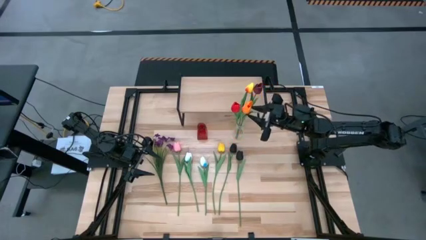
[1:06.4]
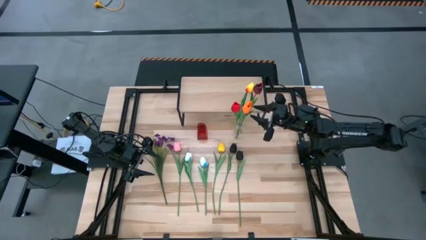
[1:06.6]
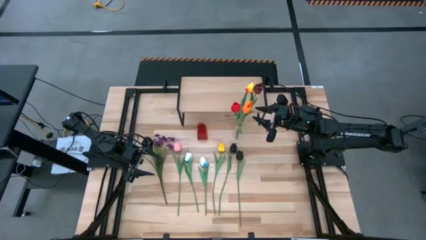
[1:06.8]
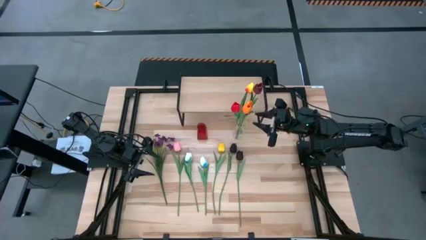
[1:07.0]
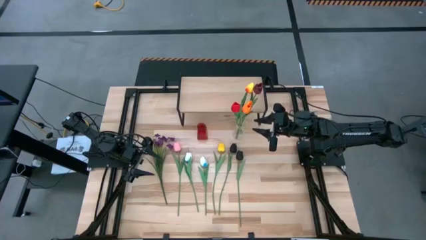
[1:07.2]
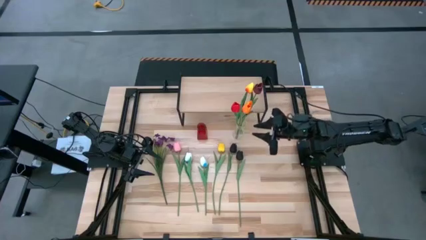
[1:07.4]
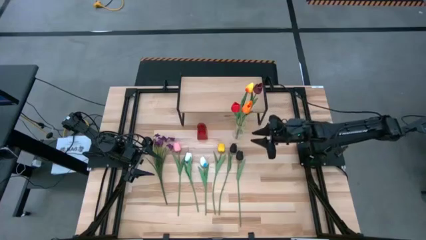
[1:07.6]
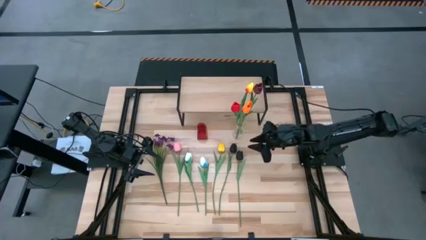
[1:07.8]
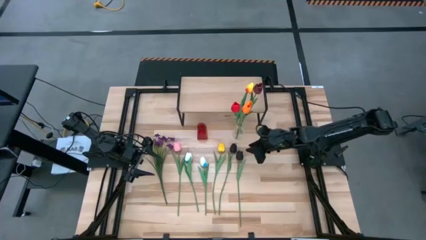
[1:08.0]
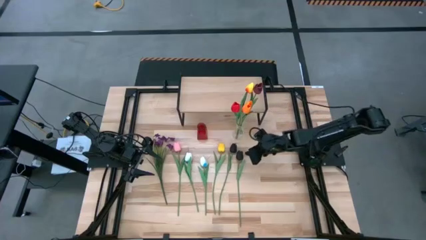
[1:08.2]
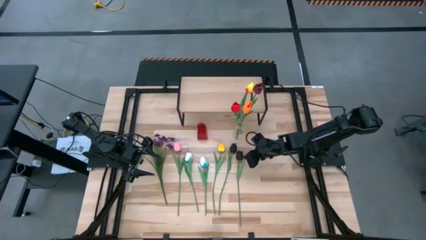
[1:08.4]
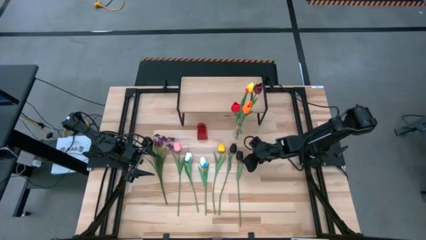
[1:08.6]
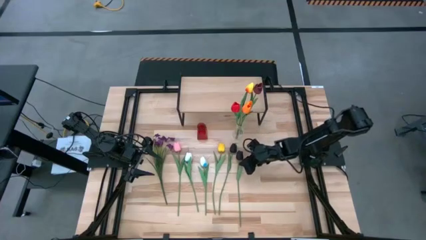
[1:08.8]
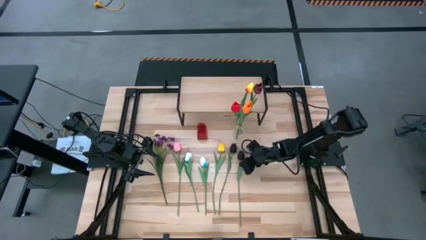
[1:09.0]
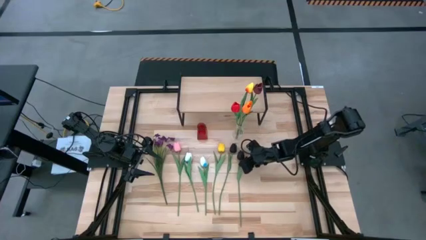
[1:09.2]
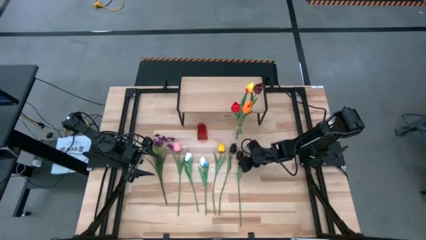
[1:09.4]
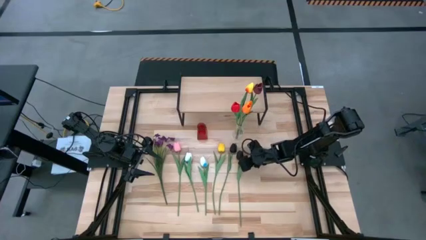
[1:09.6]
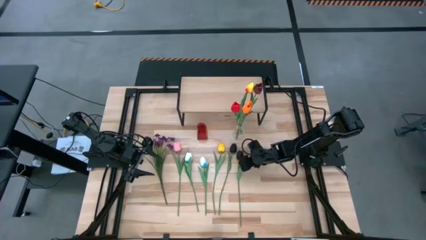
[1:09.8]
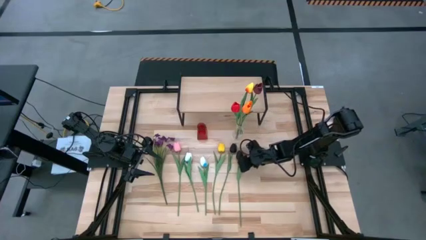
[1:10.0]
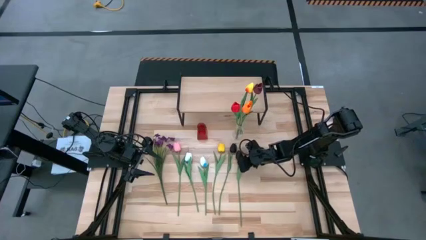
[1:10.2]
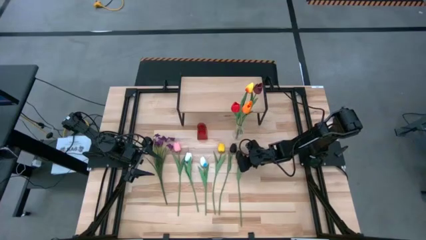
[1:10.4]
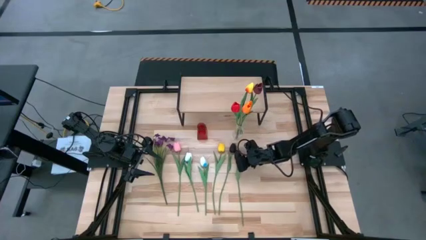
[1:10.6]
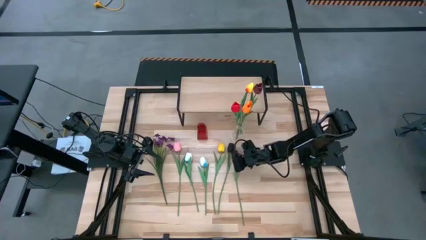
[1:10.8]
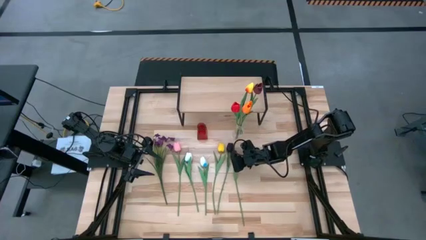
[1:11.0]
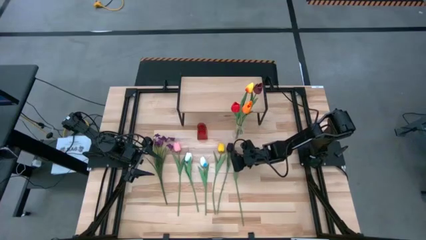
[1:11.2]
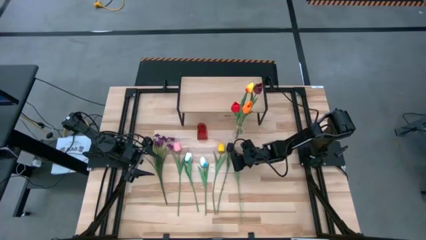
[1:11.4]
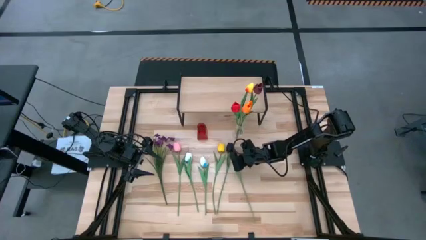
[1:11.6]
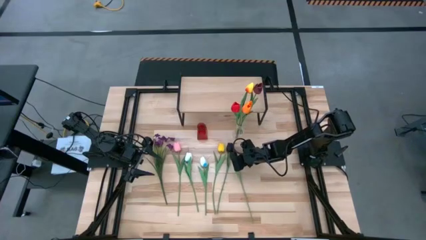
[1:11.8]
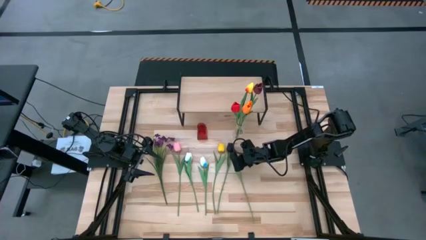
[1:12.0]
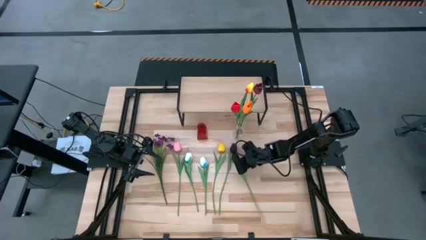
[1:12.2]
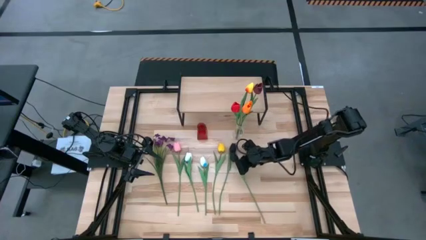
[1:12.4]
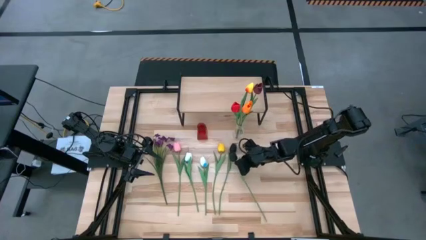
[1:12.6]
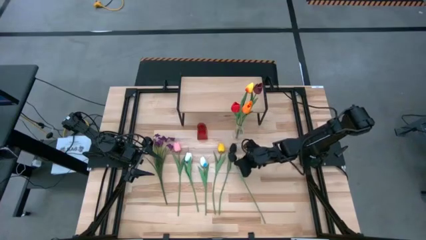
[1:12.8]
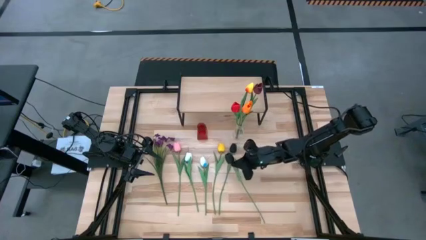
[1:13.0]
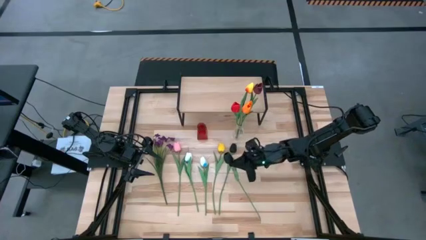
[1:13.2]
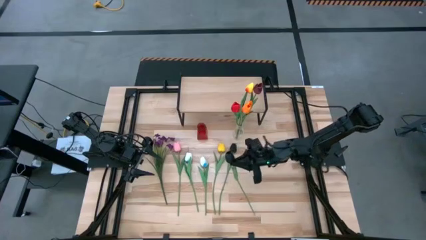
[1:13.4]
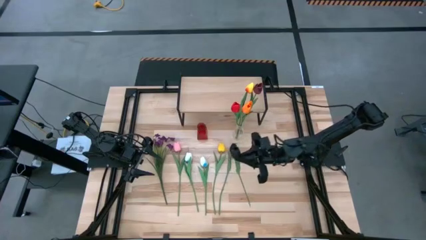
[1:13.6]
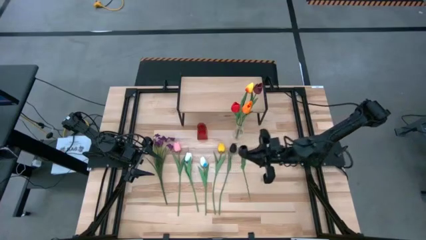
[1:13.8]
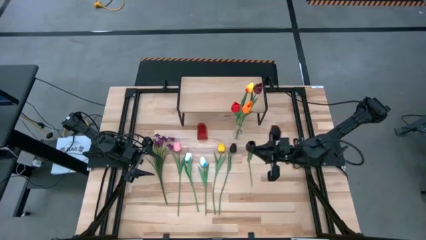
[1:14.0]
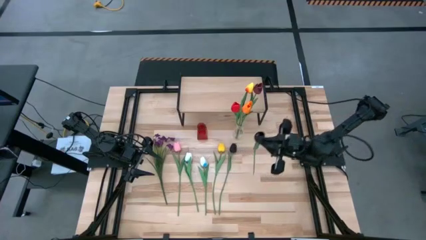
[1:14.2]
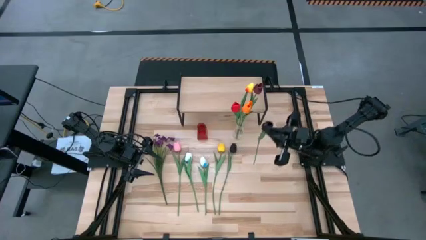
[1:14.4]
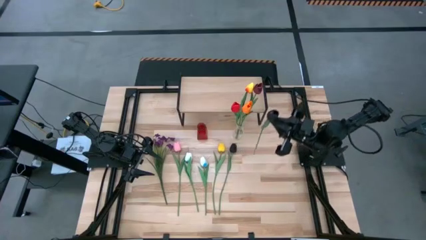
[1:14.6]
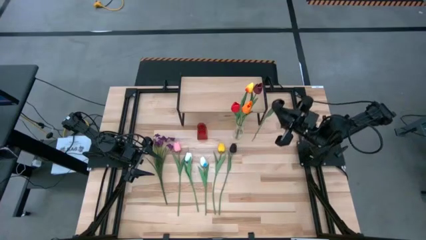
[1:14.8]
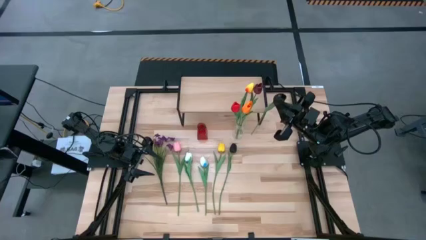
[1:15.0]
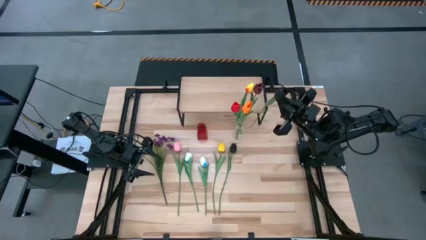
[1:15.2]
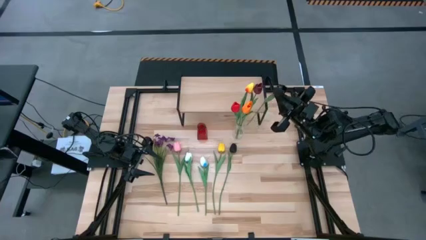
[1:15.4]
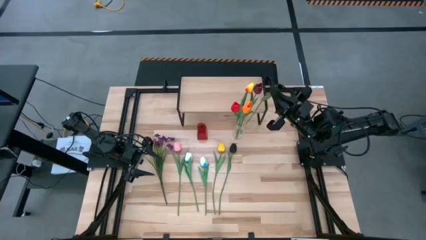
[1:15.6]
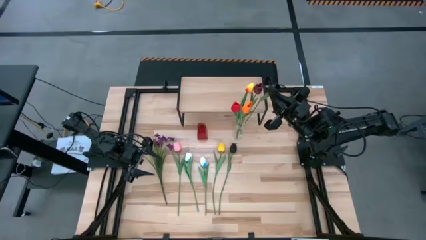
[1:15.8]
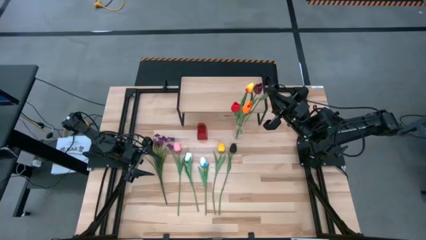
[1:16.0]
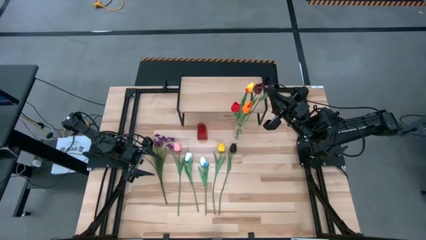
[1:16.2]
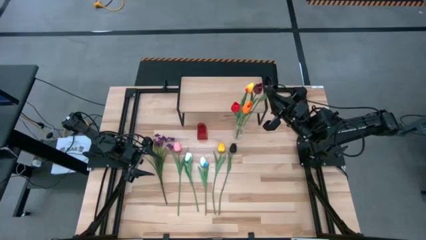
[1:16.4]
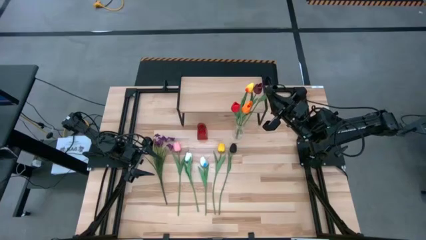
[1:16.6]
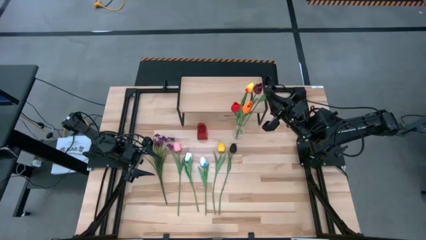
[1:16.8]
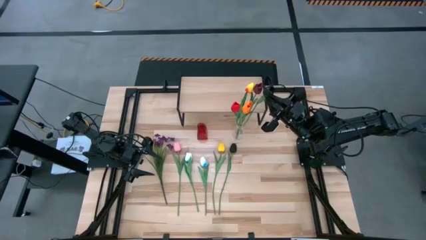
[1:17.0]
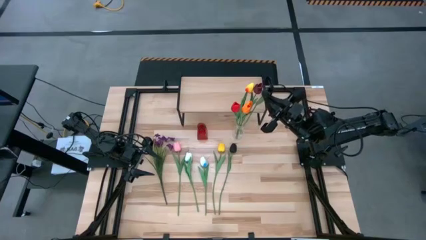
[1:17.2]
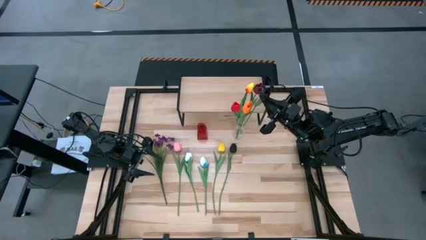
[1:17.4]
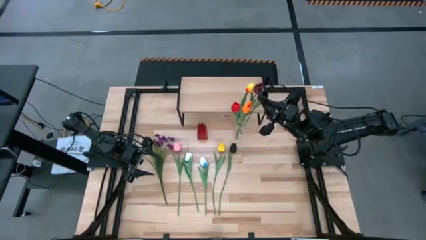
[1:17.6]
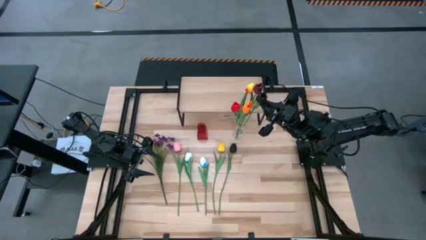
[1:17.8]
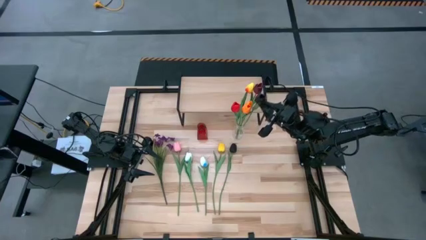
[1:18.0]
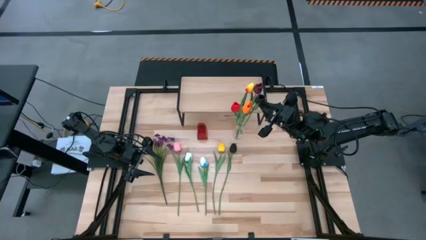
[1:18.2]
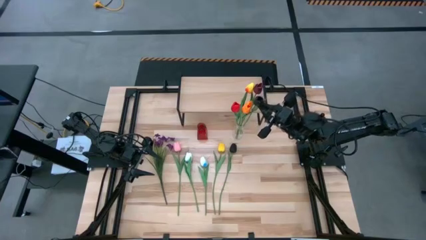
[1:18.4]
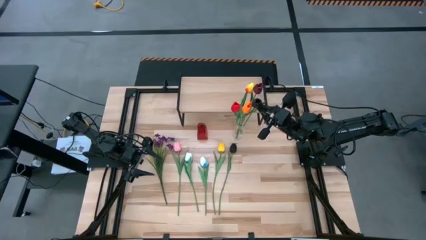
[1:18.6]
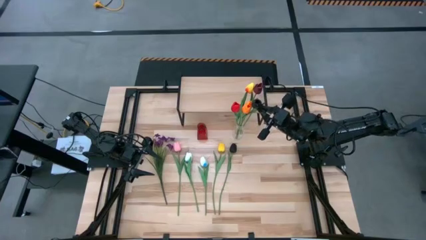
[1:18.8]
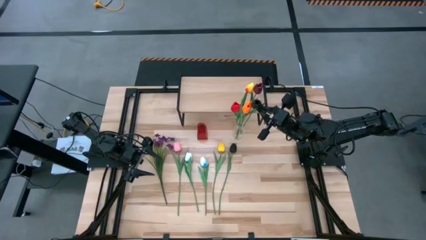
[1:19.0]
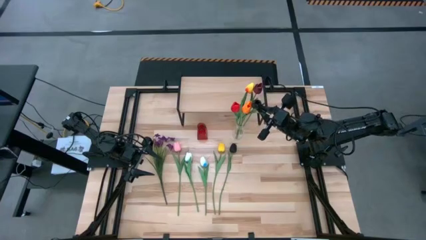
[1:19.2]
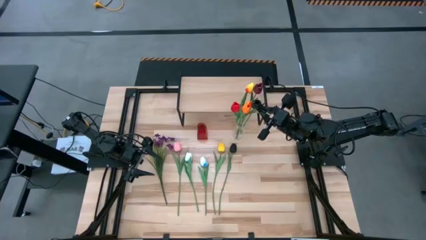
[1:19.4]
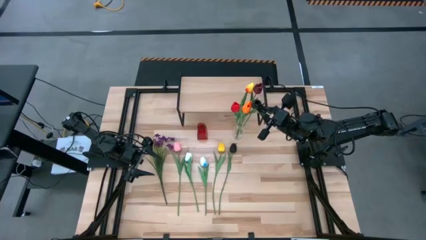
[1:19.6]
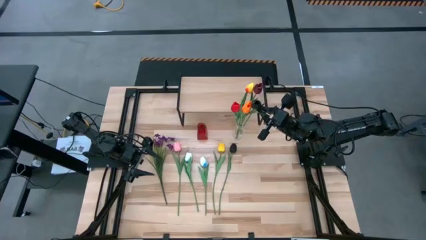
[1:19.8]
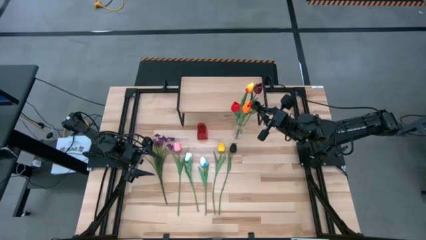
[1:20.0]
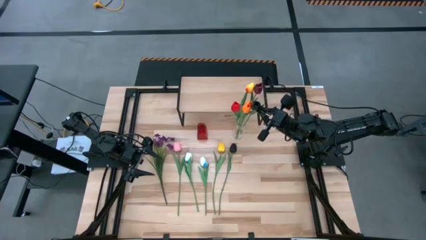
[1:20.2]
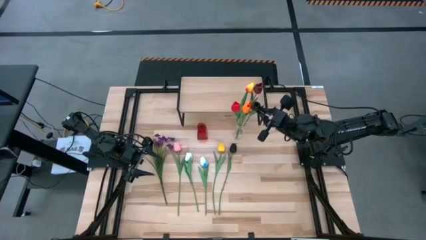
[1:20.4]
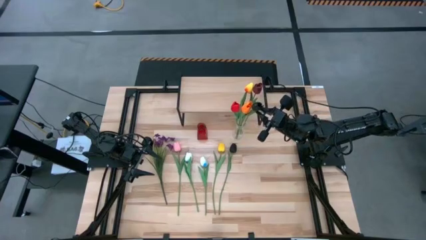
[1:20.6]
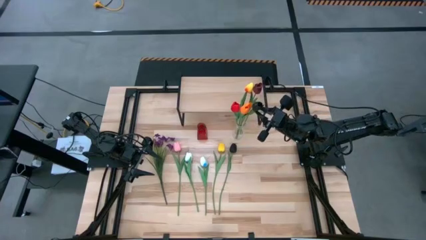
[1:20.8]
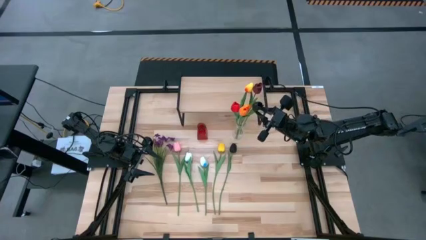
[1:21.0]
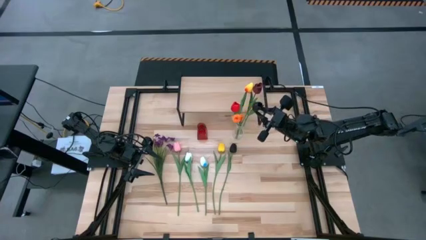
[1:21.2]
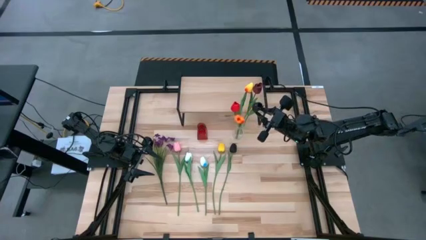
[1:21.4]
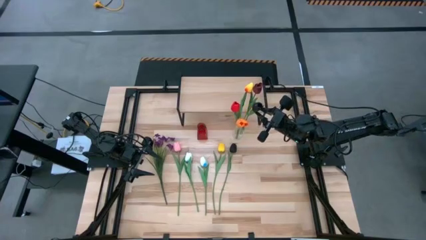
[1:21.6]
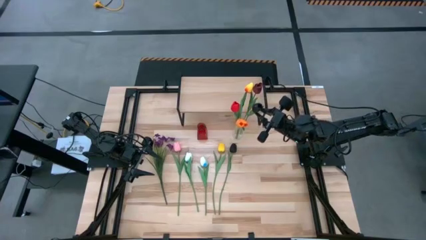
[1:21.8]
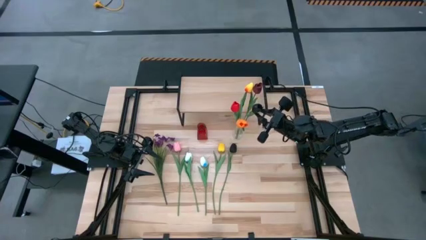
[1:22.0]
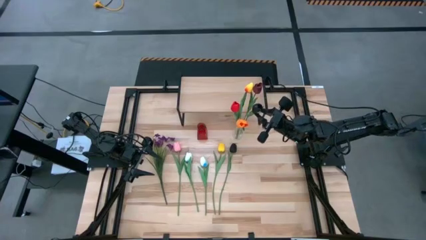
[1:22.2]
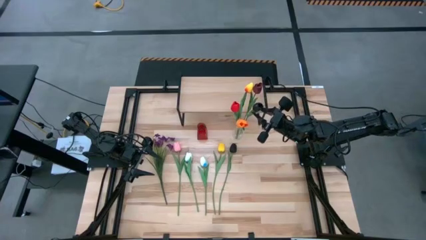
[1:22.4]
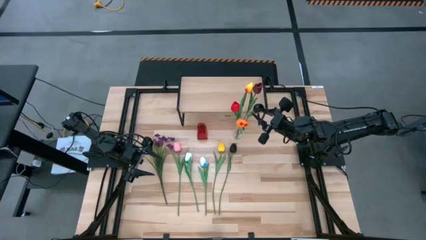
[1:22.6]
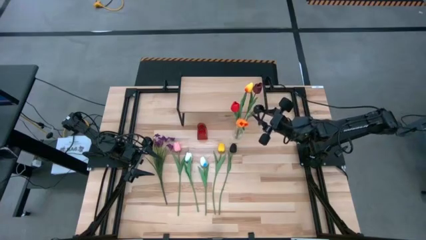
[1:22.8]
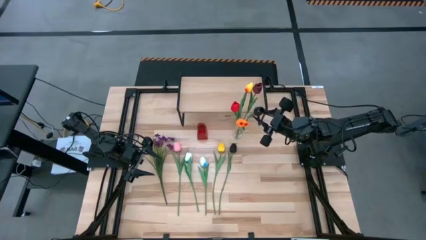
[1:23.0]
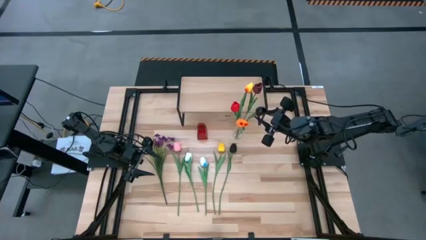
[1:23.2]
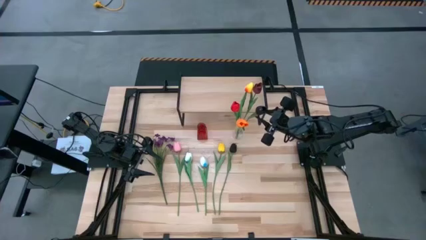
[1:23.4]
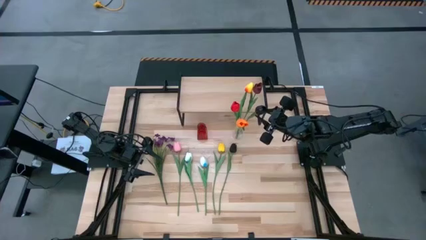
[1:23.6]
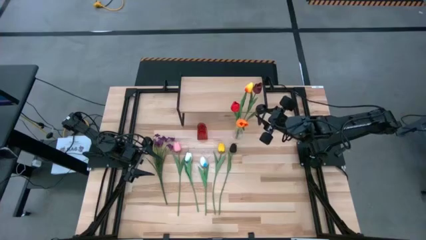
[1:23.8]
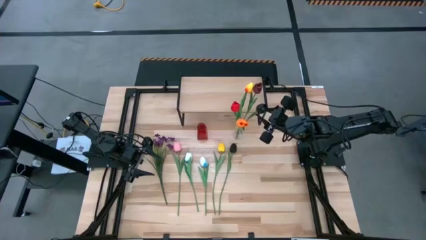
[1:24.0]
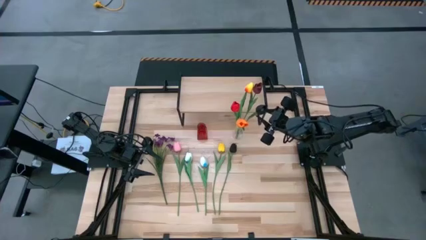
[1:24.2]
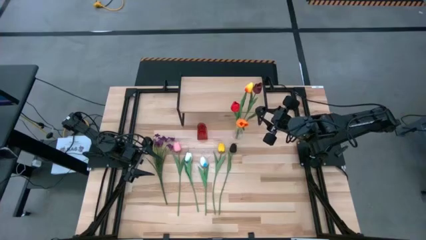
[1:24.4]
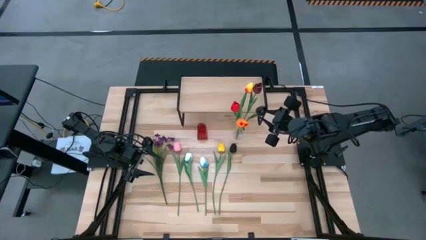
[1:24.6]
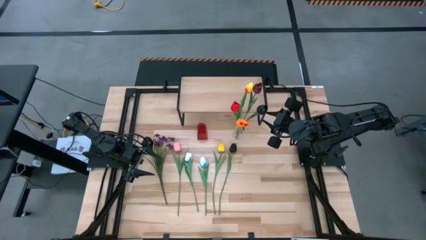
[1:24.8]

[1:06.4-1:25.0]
Task: Pick and place flowers into a vace then onto a shelf
Put the right black flower into the transparent vase
